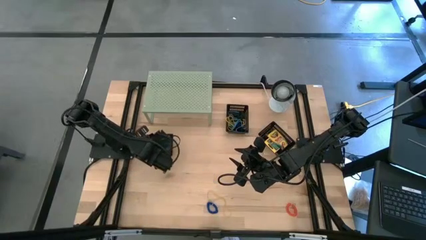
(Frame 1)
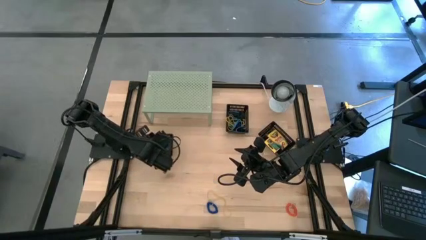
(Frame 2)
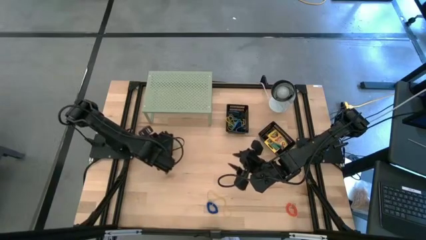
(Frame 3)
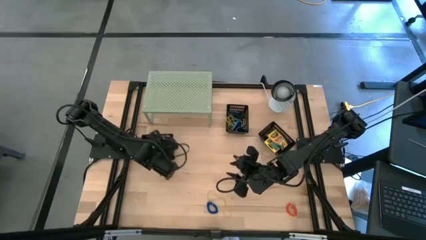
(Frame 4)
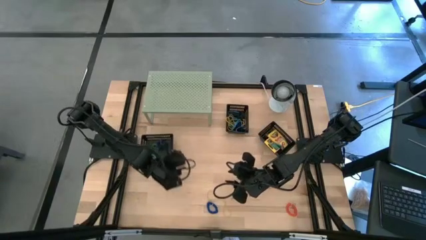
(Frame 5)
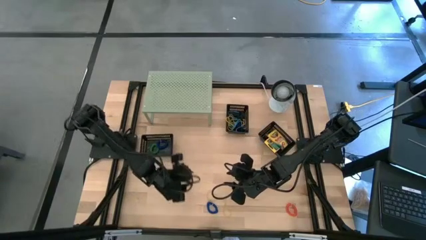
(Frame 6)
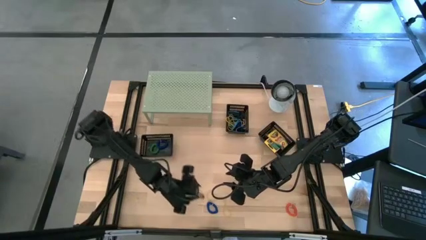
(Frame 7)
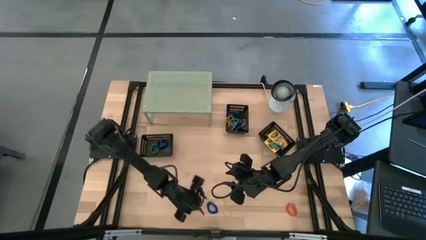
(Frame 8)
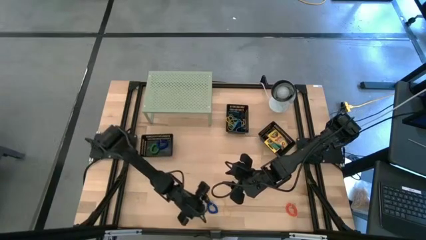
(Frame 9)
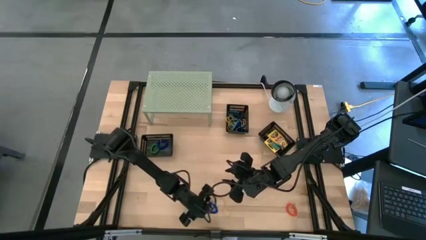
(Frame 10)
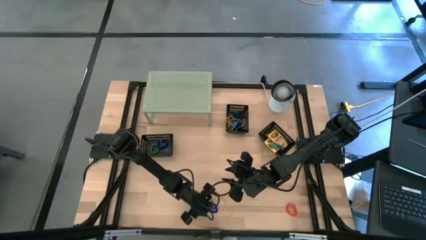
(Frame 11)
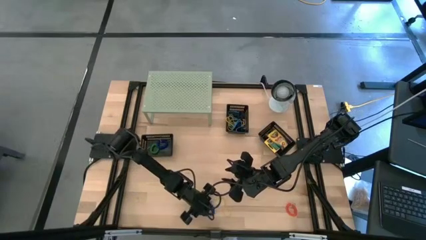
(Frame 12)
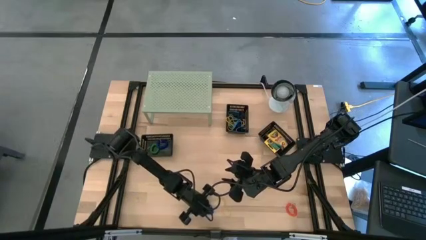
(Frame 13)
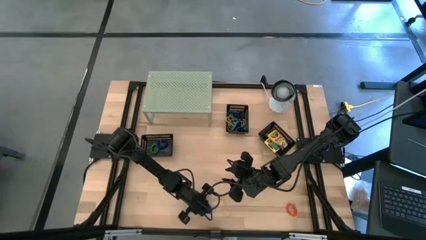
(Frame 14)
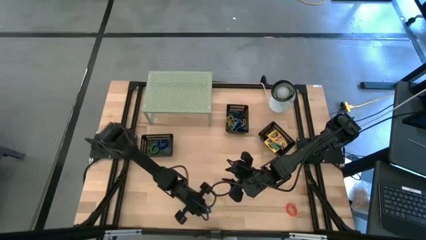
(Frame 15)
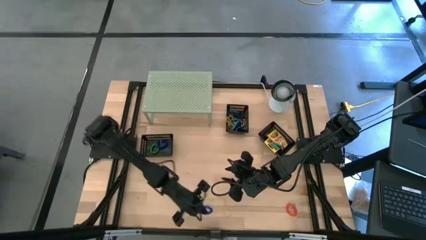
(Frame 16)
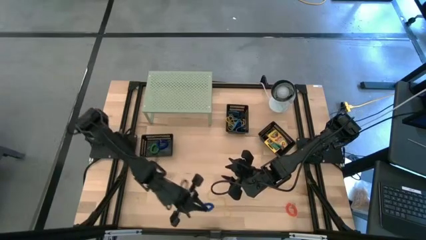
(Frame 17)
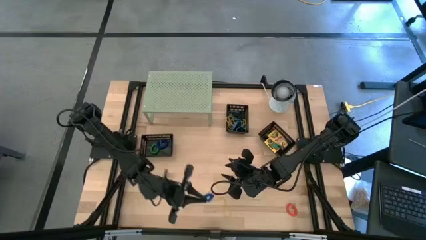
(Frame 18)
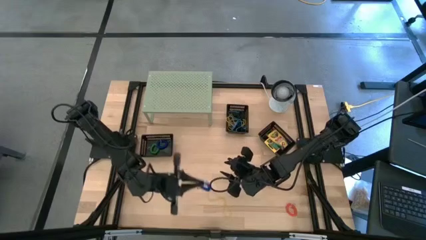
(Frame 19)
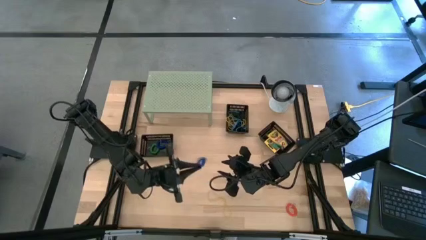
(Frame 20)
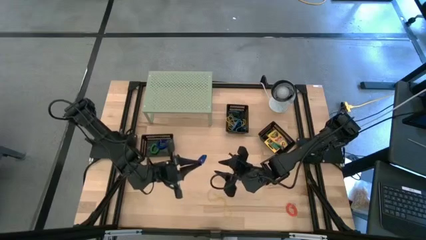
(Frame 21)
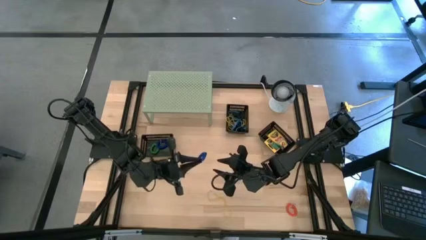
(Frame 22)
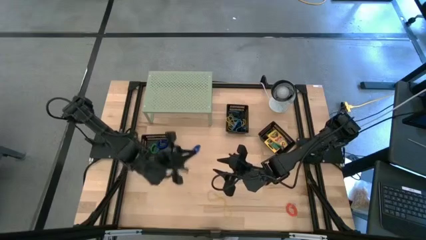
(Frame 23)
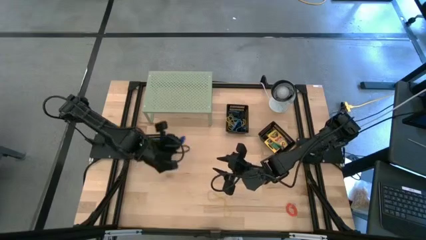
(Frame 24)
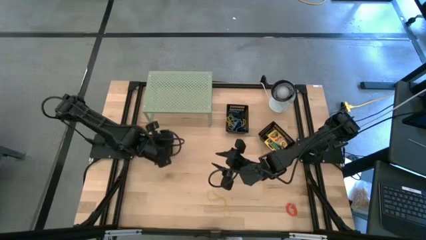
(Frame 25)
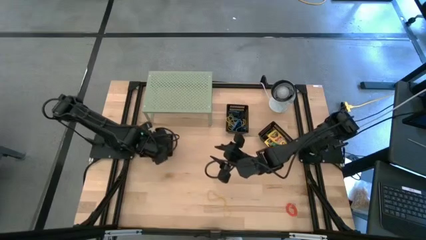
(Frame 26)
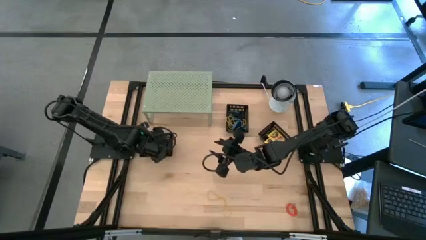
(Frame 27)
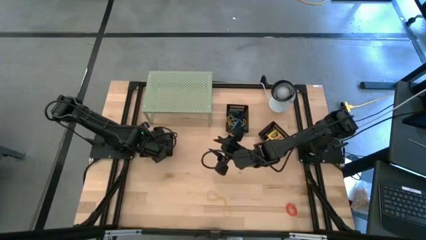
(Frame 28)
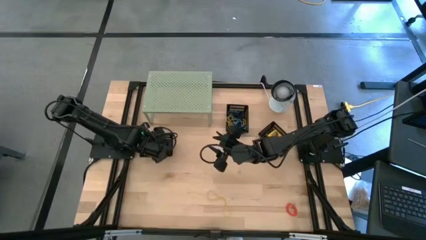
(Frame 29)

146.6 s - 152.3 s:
Task: Pick & Place Office Desk Supplies
Put the blue spring rubber band into the left black bin

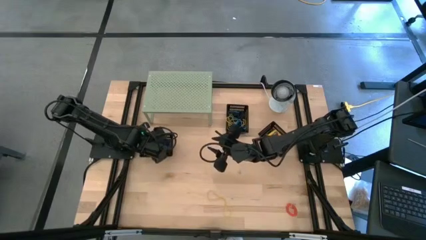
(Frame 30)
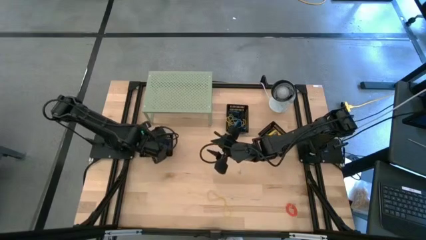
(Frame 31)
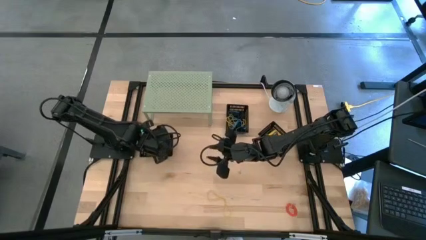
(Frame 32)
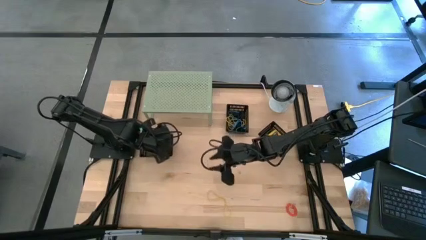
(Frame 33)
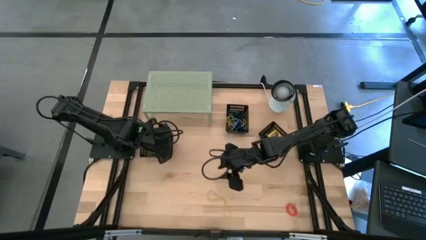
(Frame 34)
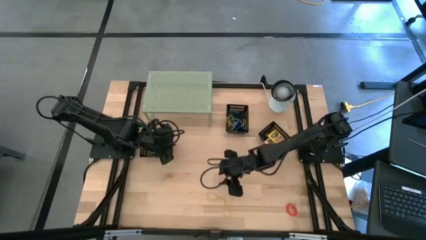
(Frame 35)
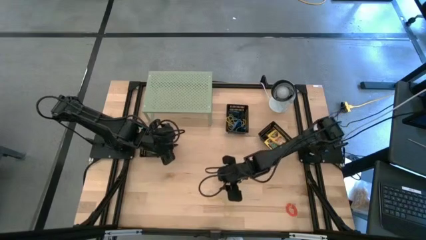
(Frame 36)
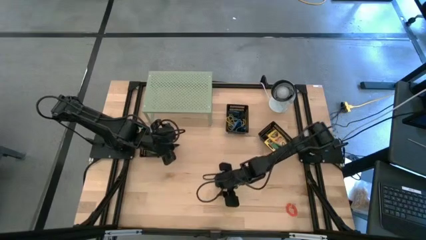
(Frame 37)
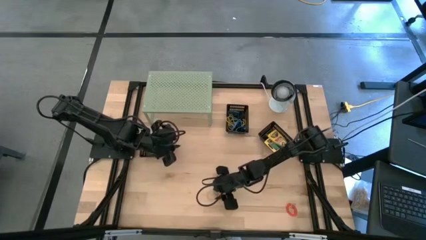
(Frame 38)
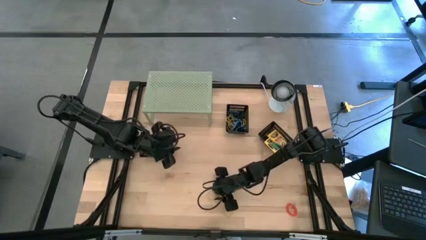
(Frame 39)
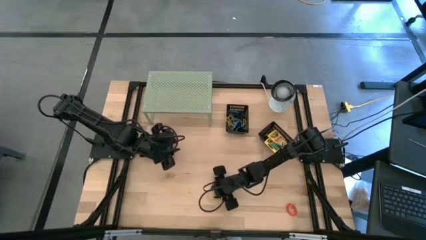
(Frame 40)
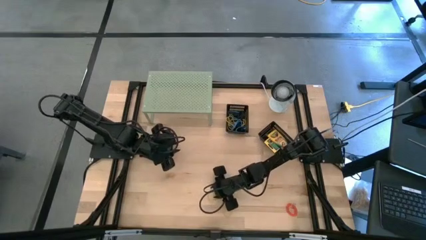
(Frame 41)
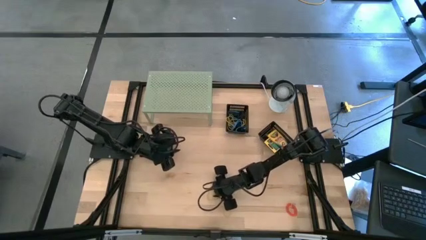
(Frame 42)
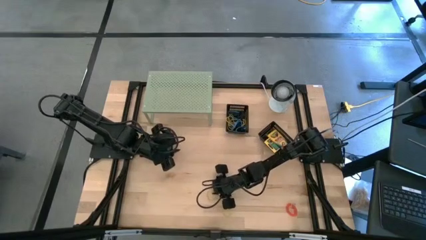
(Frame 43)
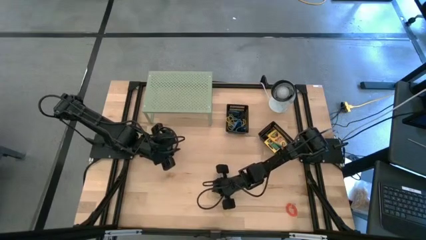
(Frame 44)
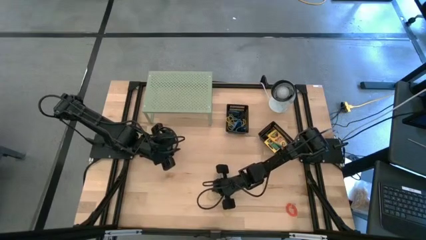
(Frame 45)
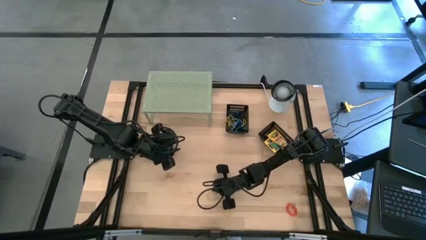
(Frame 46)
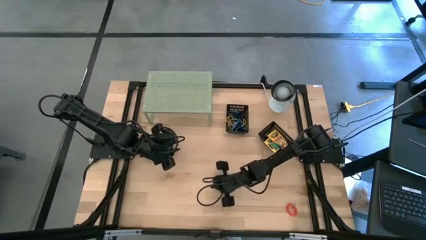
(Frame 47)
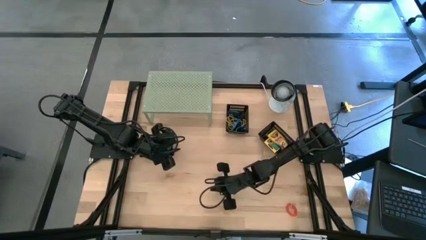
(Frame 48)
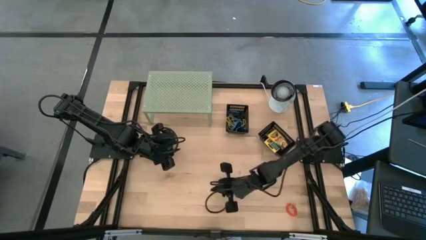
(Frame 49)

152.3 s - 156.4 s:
Put the yellow rubber band into the top black bin

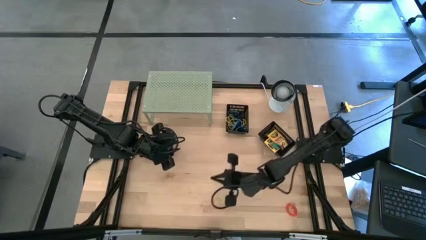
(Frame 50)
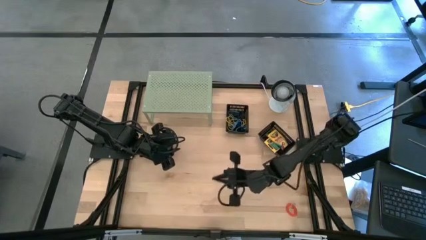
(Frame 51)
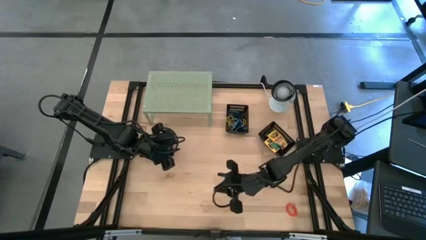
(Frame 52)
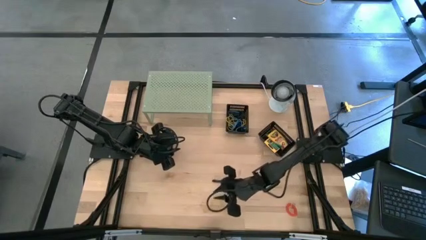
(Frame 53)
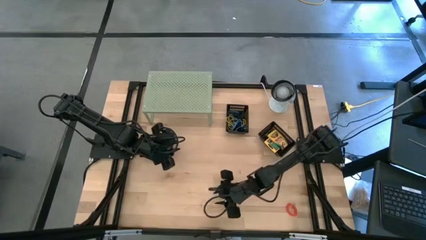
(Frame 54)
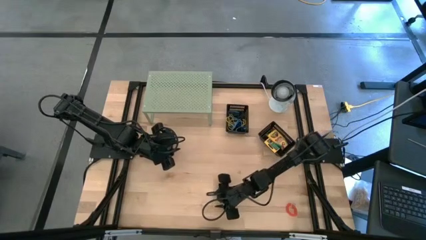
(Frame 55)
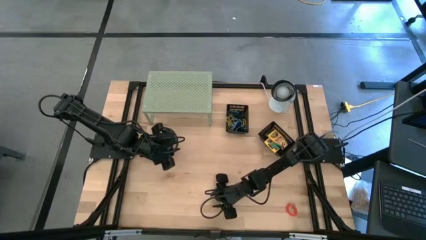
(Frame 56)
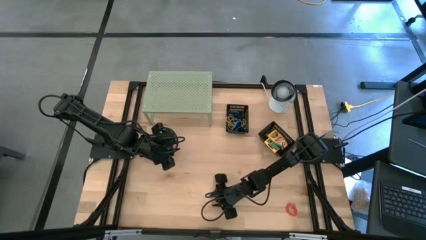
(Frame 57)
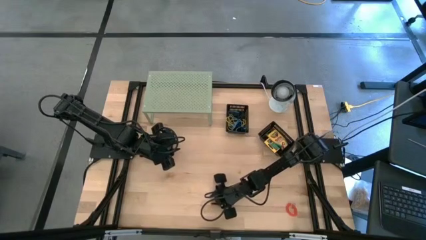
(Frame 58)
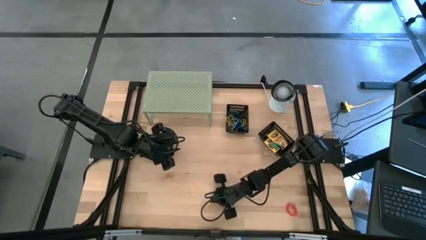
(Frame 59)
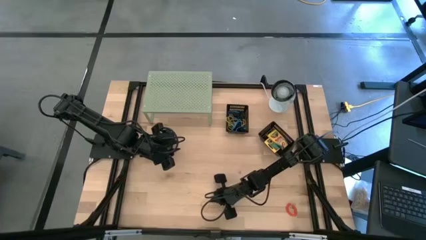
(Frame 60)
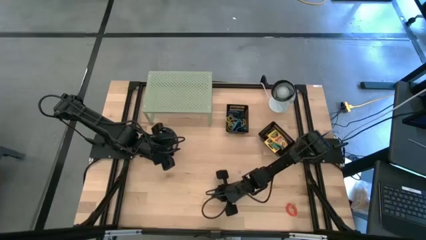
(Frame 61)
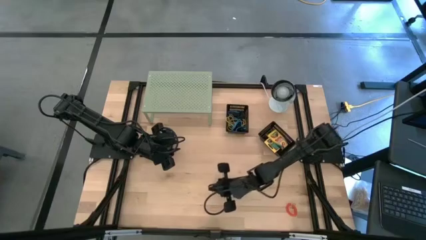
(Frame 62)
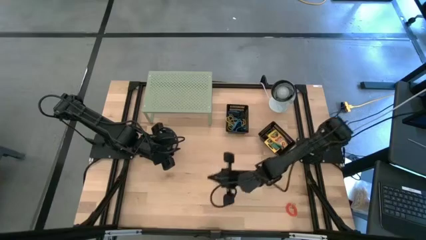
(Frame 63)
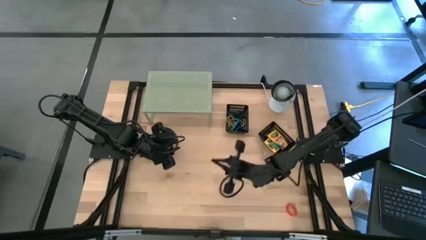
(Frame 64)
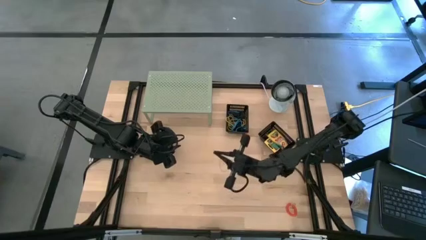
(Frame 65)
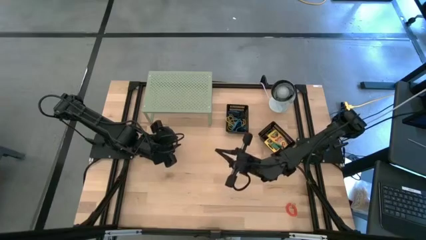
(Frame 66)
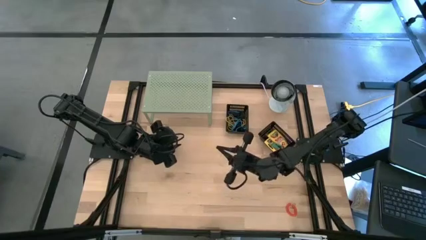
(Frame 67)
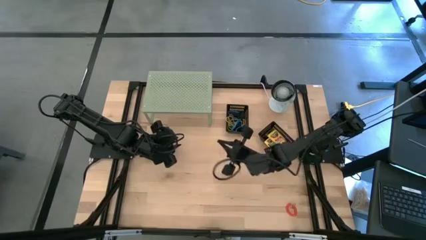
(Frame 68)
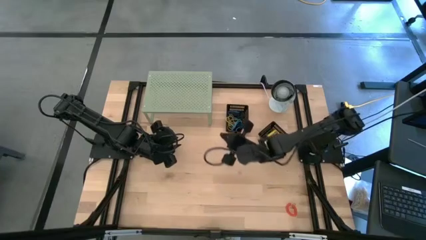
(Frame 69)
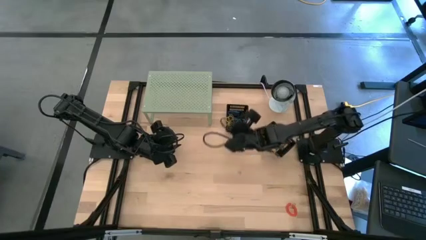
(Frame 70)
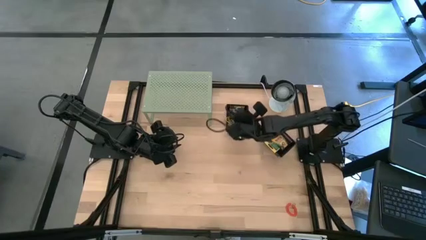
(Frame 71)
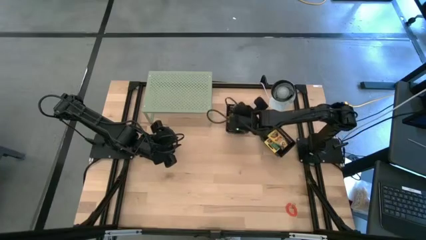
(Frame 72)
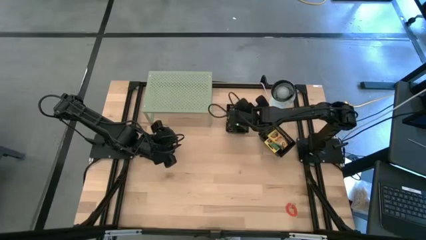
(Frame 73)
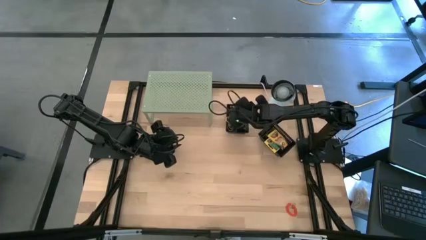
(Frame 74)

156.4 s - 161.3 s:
Put the yellow rubber band into the top black bin
